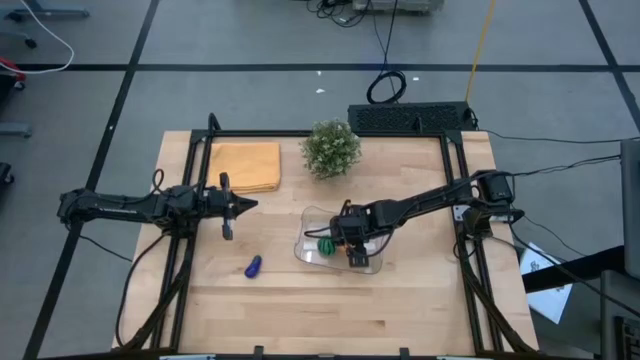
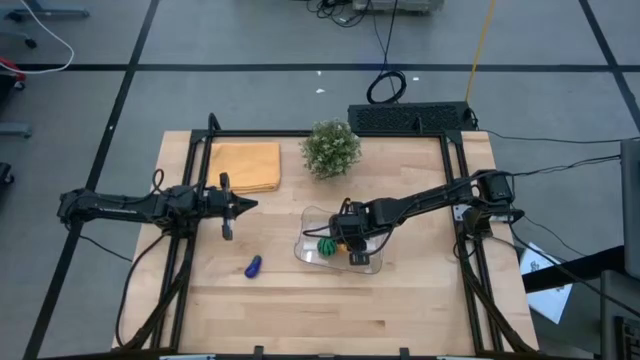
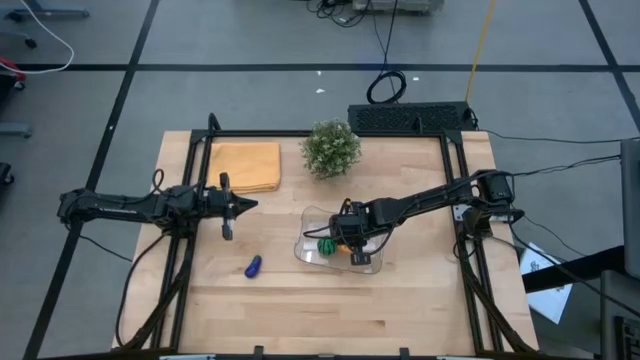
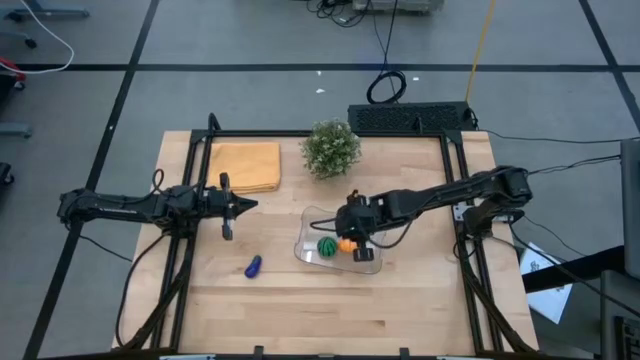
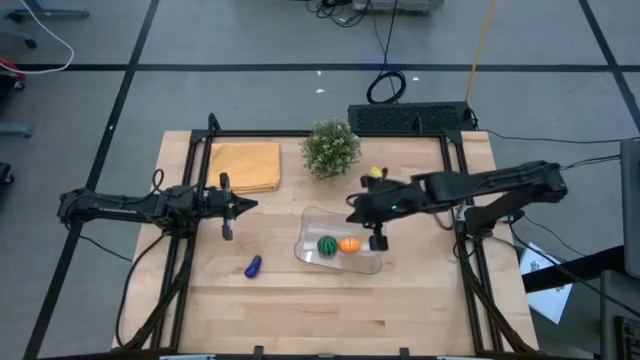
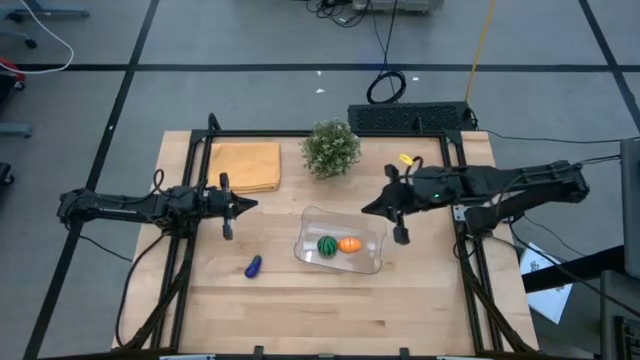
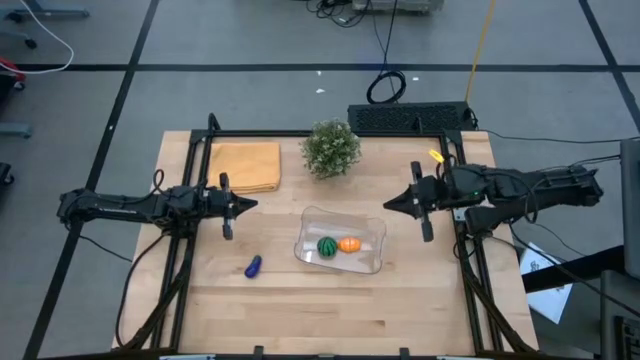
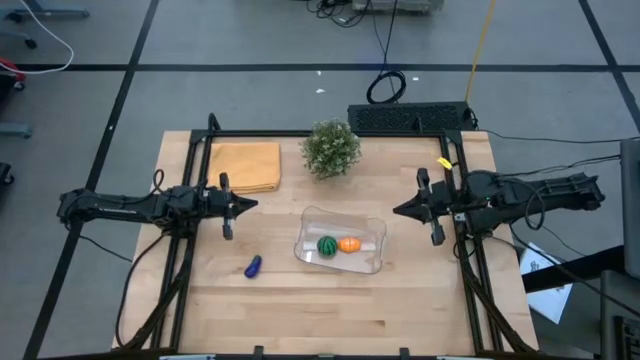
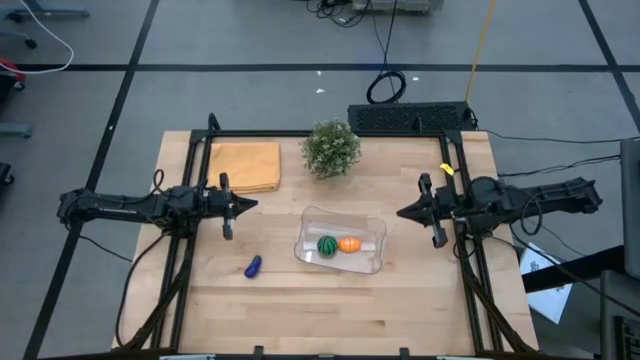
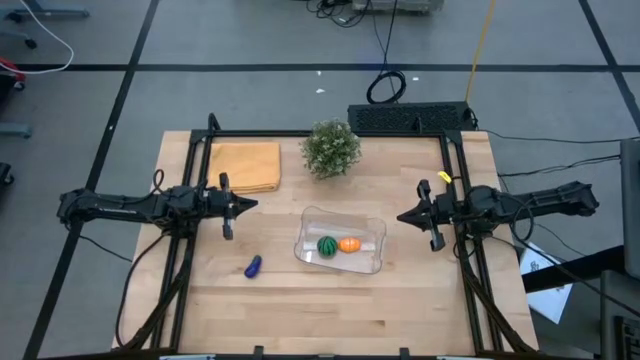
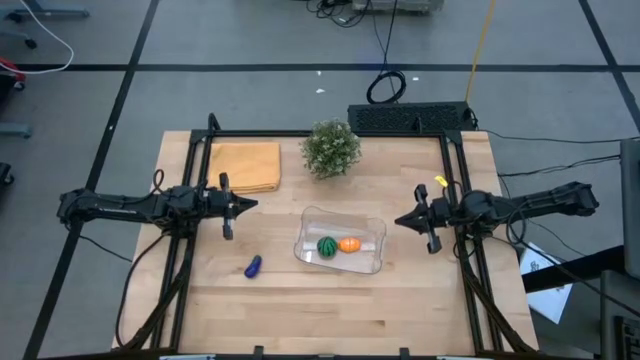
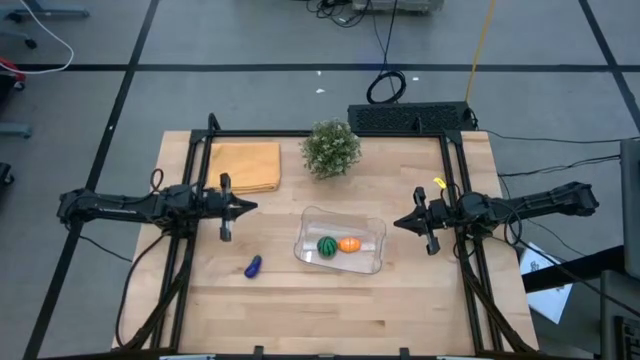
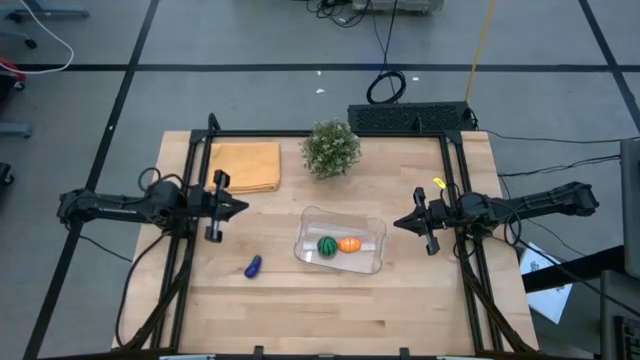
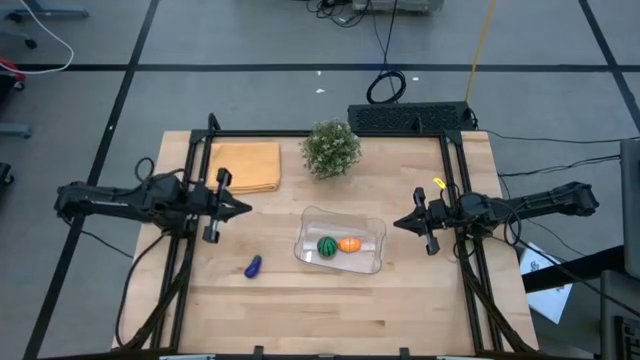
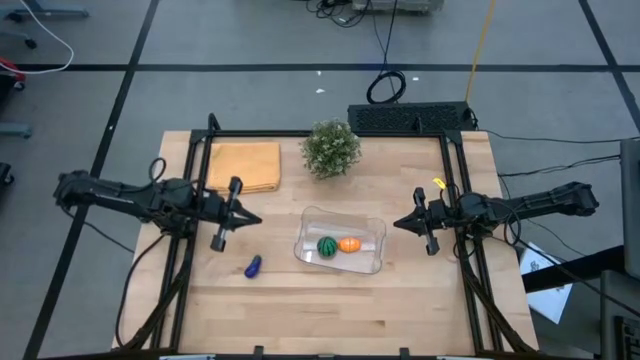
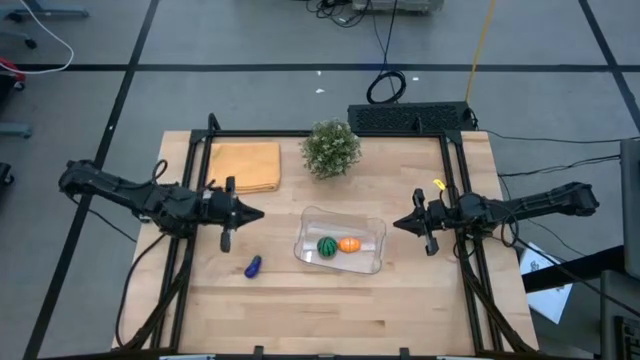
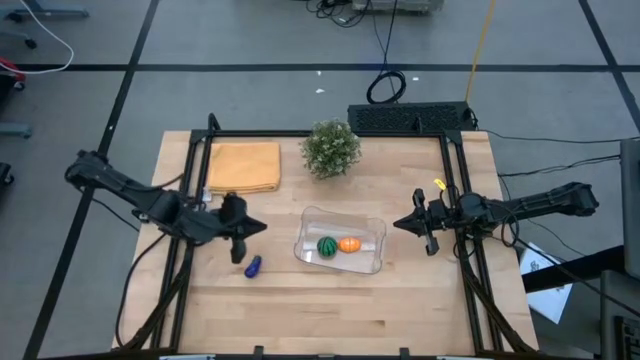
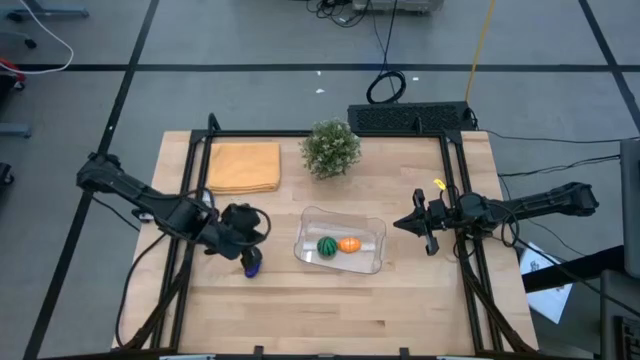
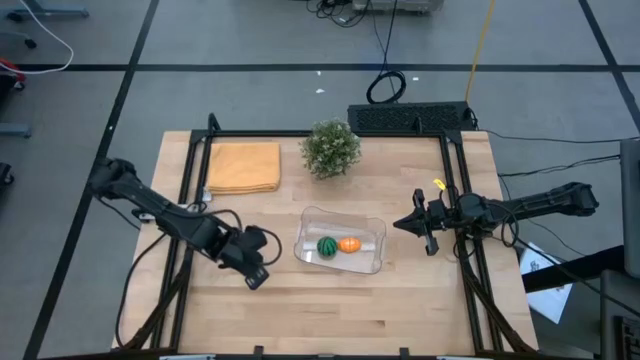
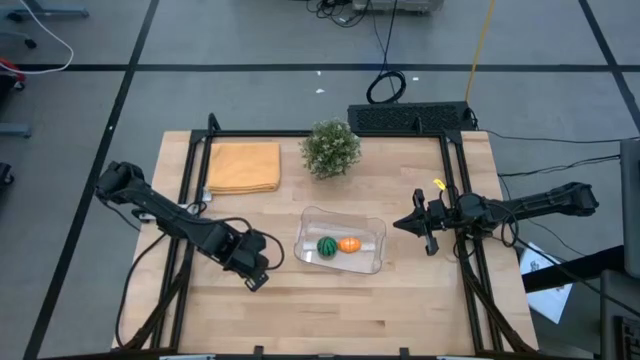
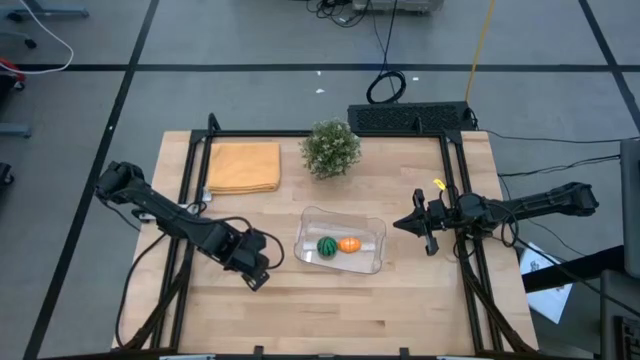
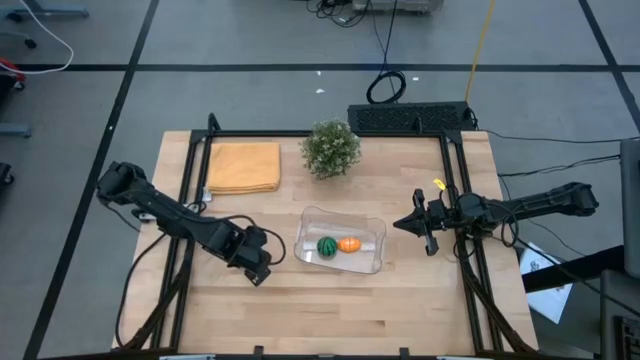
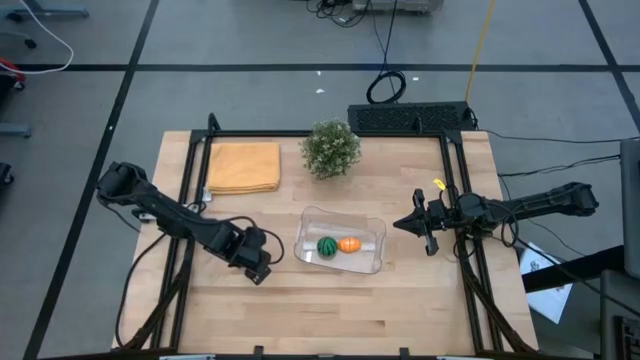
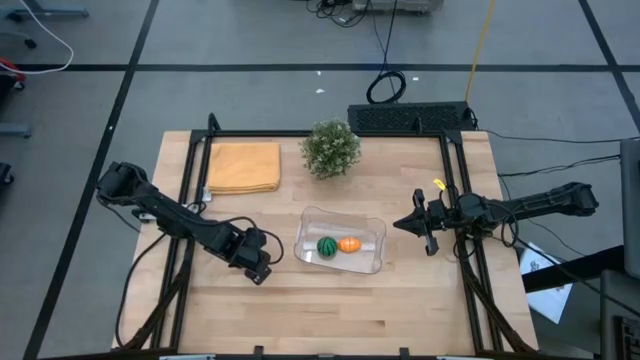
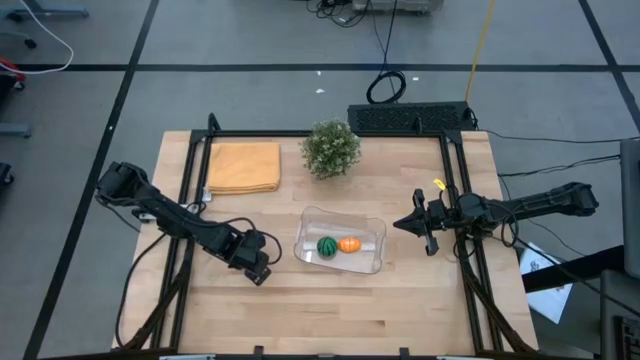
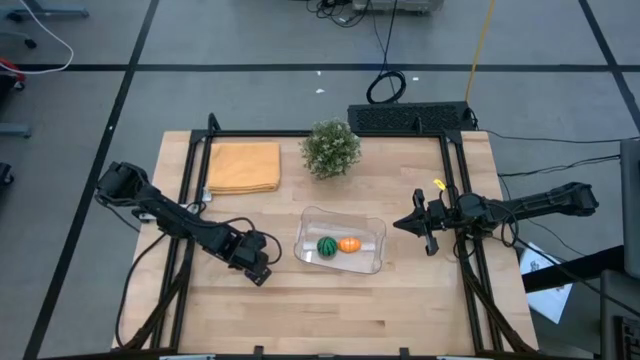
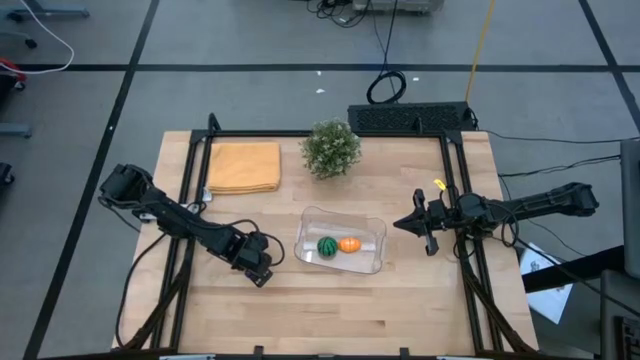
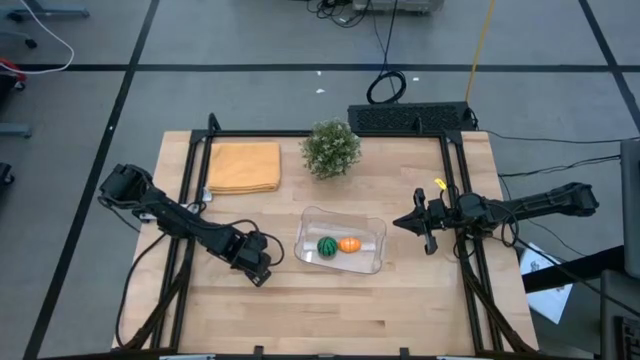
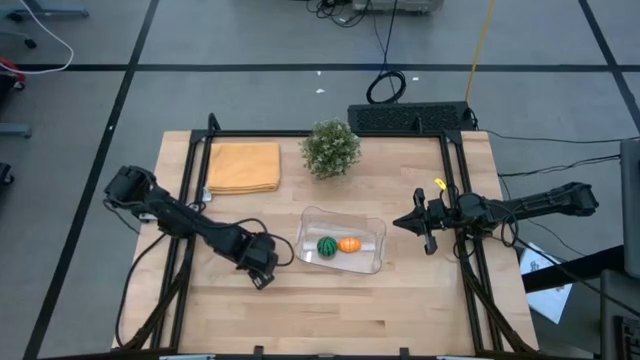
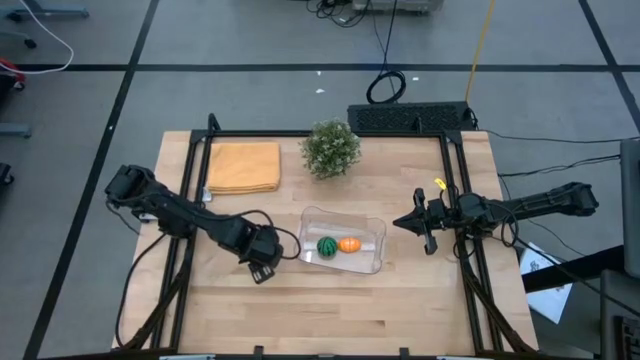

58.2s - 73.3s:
Task: Pick and placing Produce into tupperware
Put the eggplant into the transparent bin

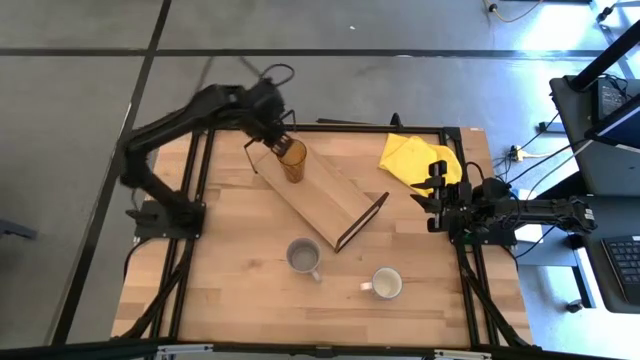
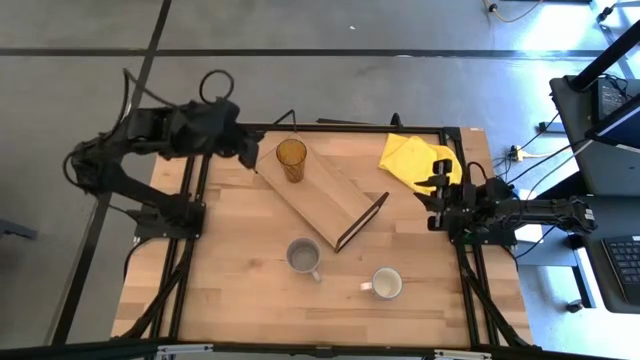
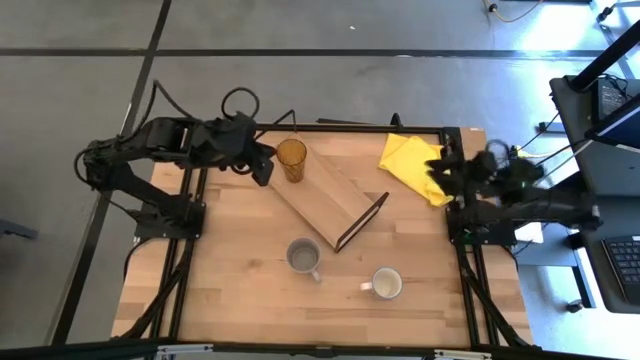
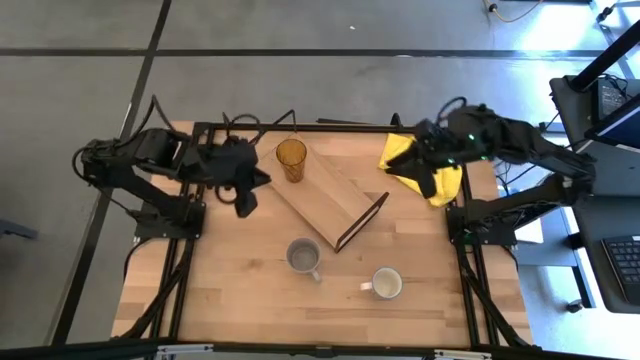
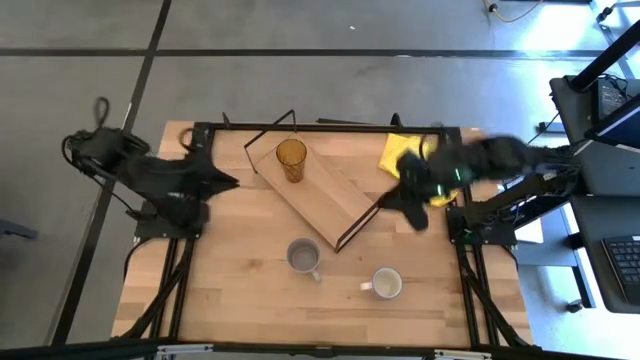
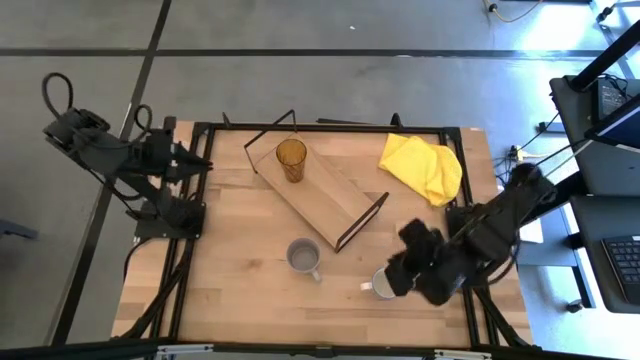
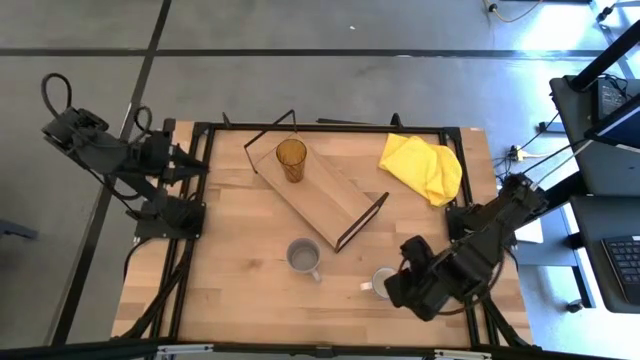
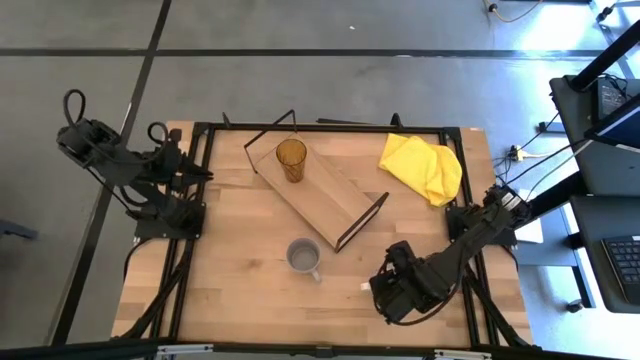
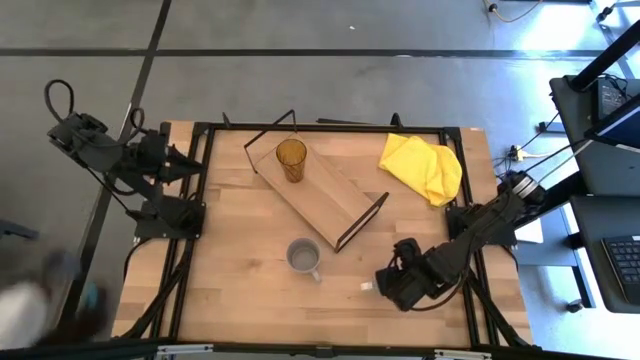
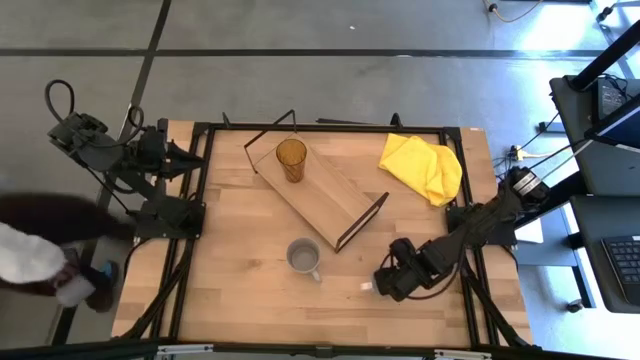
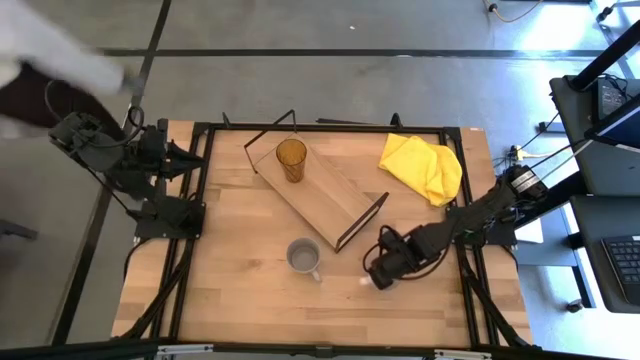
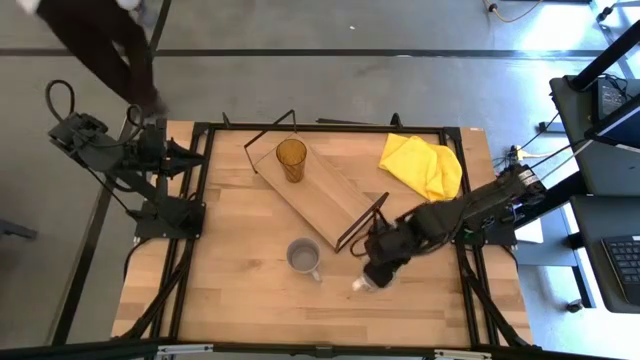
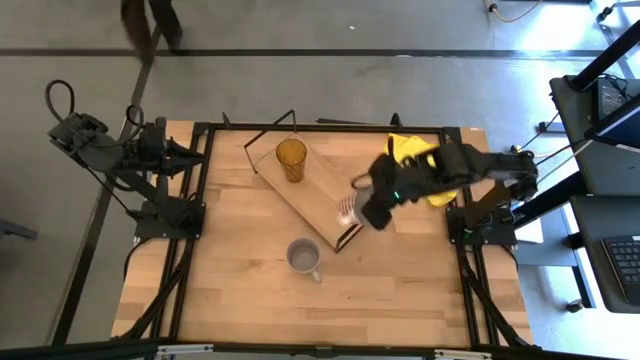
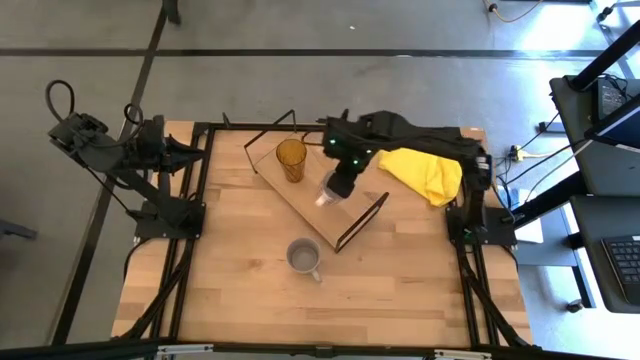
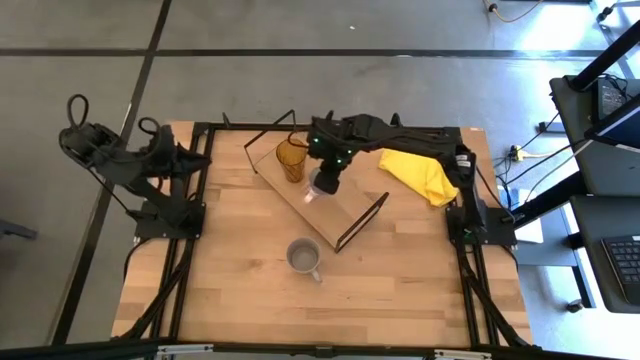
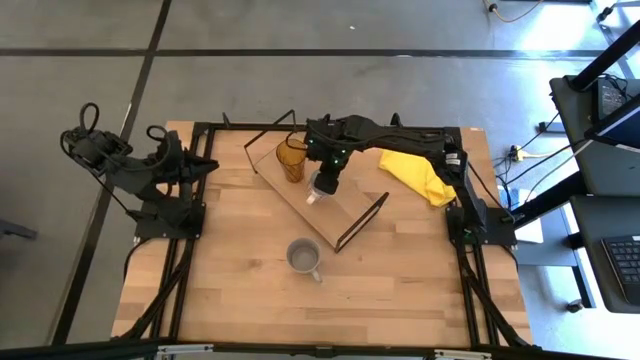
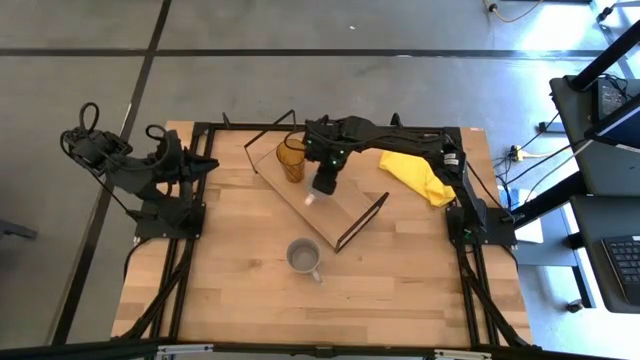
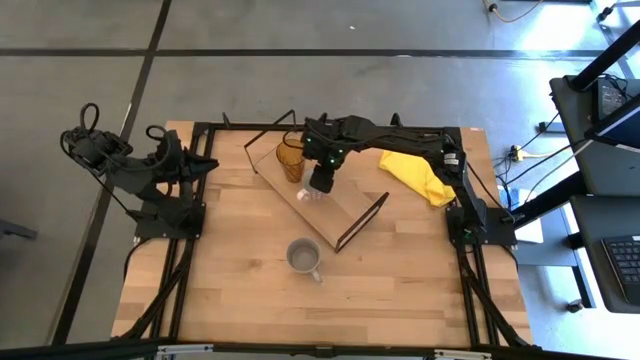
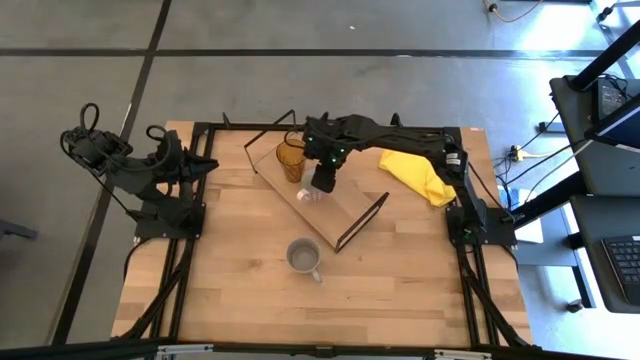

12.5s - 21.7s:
Task: Stack small to large cups/mugs on shelf
Put the red patterned mug on the shelf
